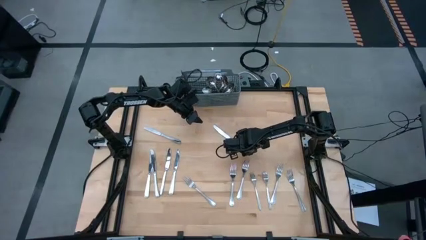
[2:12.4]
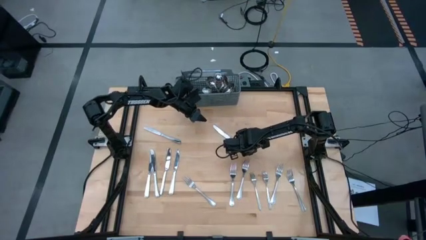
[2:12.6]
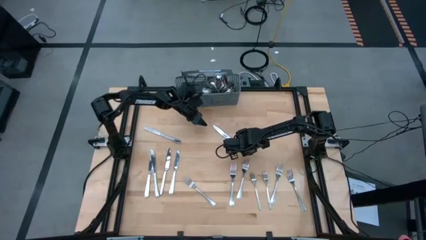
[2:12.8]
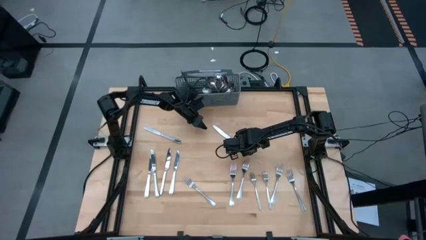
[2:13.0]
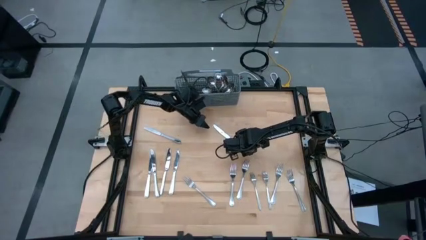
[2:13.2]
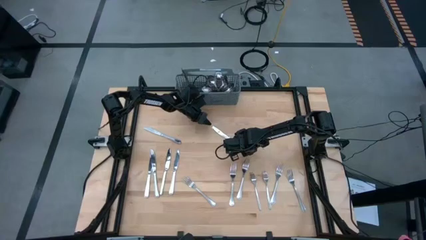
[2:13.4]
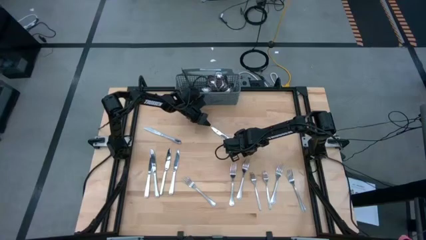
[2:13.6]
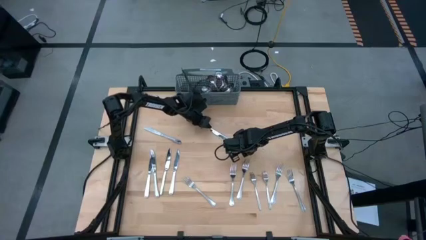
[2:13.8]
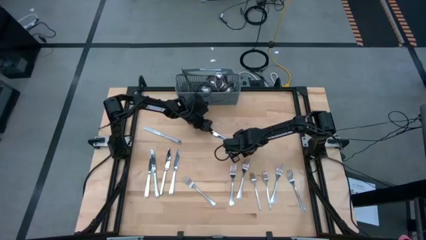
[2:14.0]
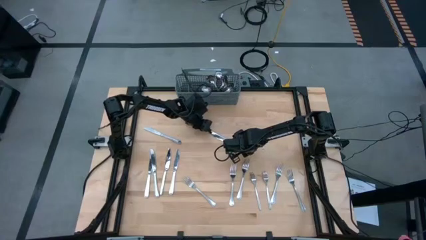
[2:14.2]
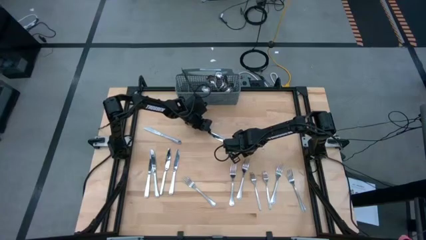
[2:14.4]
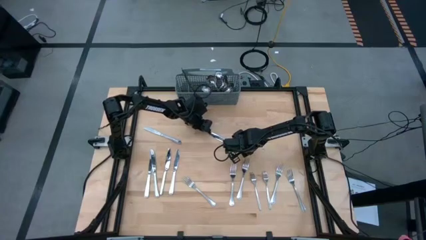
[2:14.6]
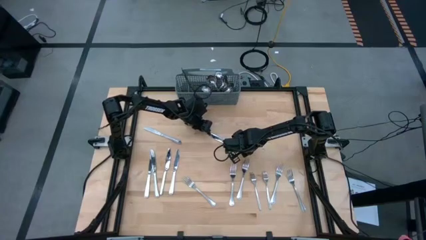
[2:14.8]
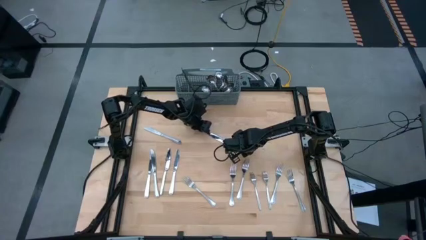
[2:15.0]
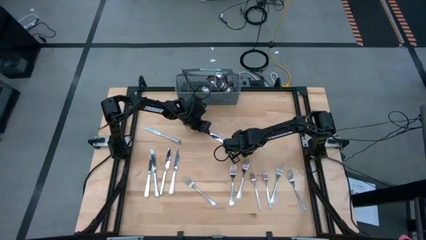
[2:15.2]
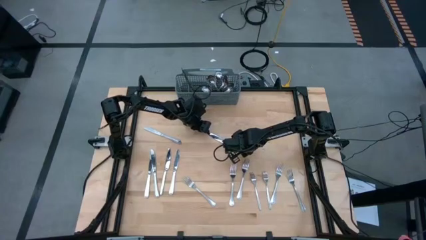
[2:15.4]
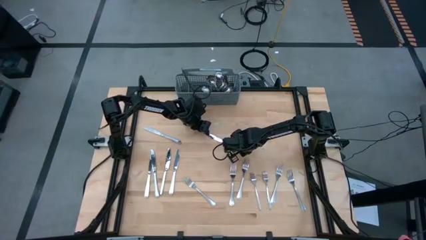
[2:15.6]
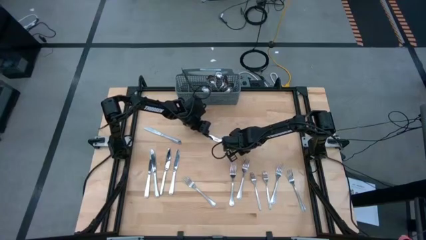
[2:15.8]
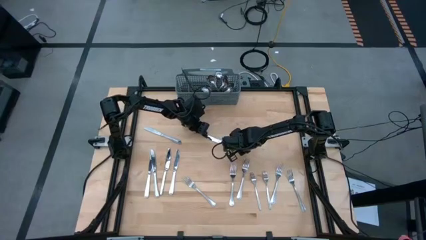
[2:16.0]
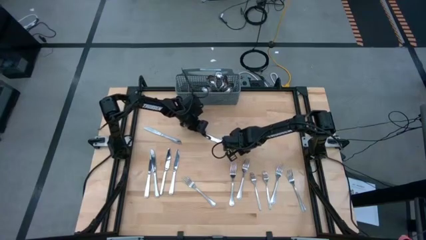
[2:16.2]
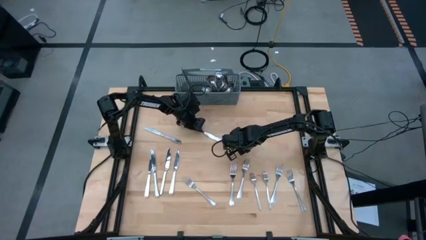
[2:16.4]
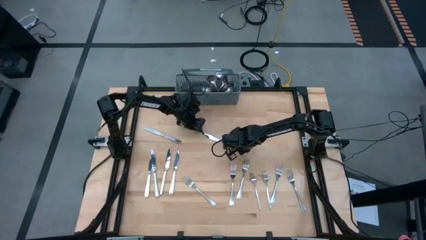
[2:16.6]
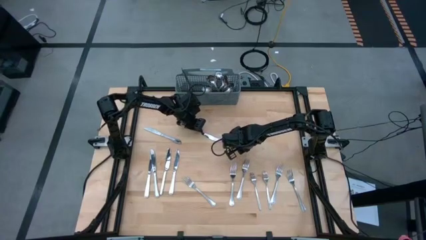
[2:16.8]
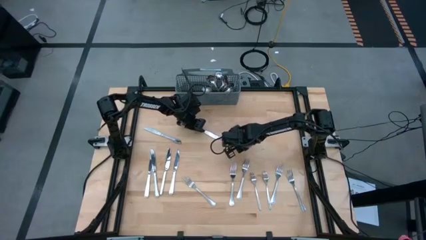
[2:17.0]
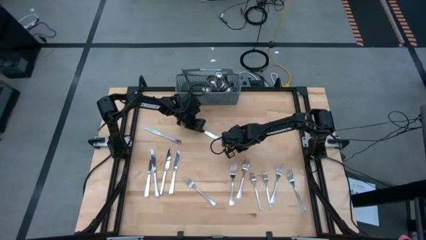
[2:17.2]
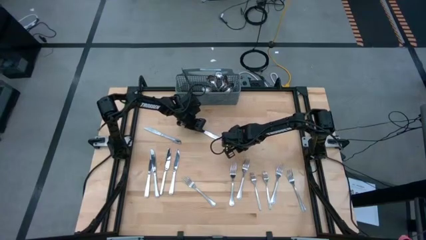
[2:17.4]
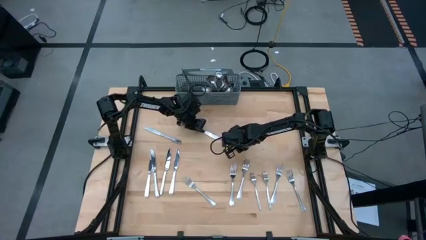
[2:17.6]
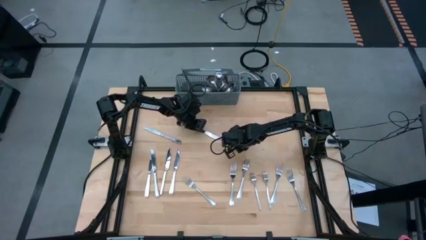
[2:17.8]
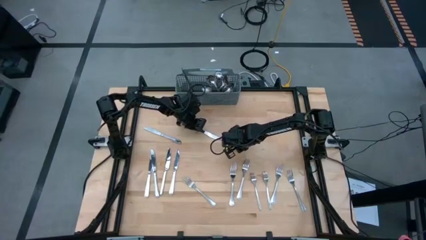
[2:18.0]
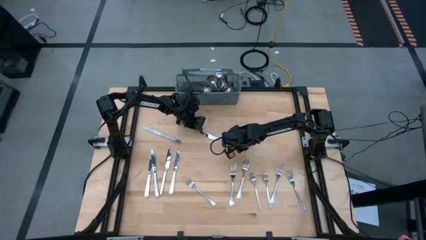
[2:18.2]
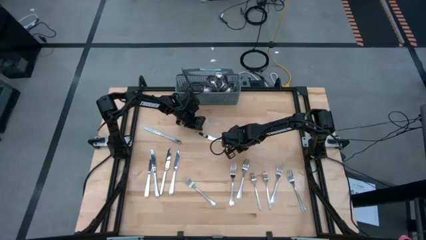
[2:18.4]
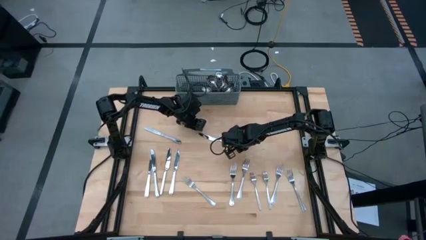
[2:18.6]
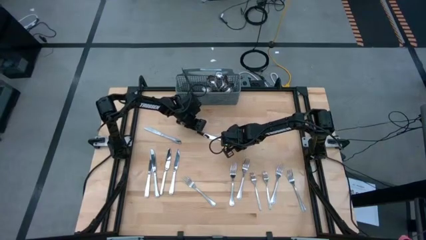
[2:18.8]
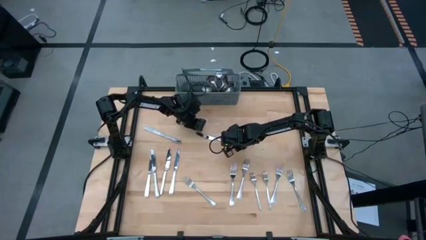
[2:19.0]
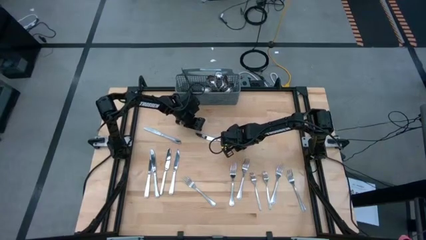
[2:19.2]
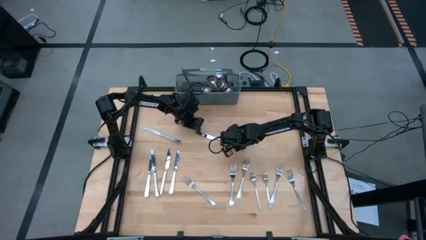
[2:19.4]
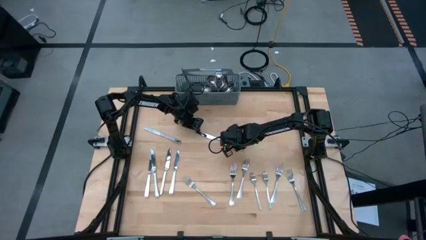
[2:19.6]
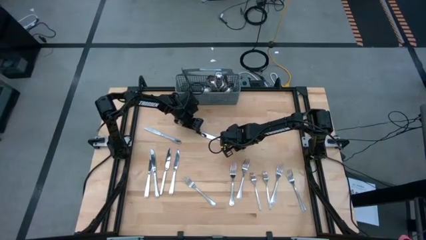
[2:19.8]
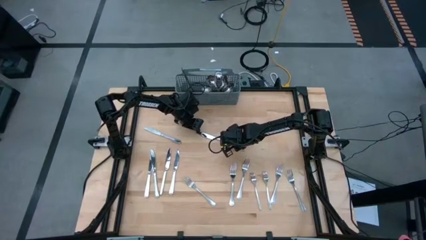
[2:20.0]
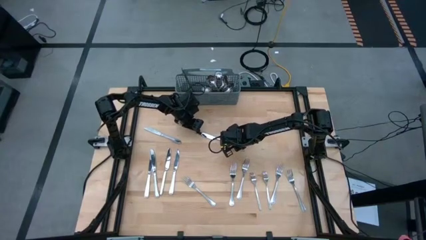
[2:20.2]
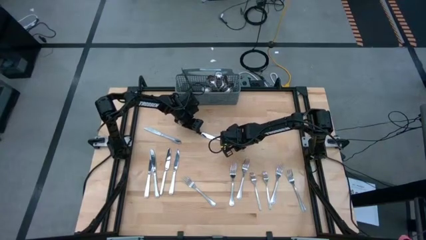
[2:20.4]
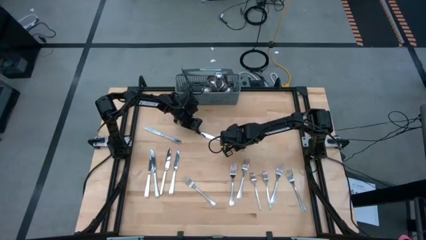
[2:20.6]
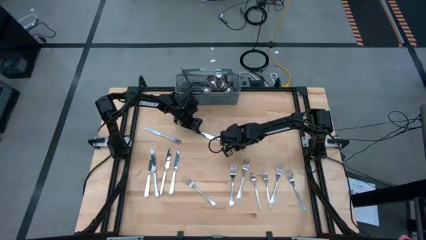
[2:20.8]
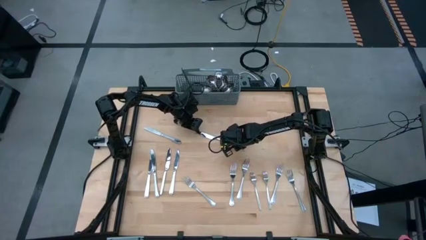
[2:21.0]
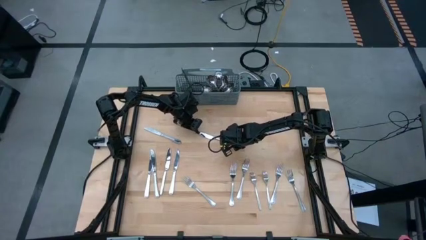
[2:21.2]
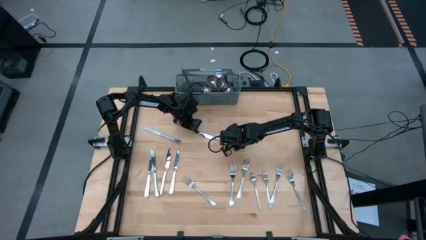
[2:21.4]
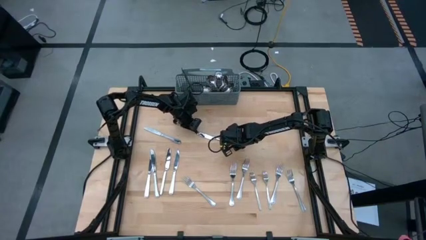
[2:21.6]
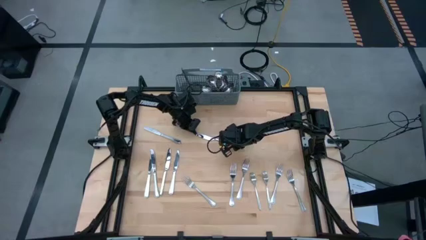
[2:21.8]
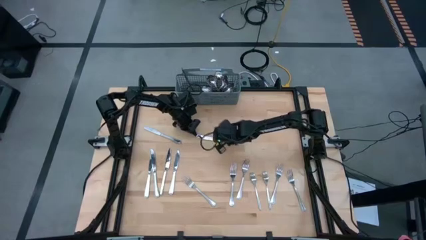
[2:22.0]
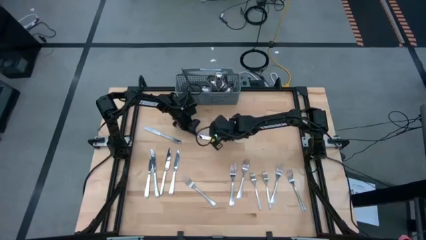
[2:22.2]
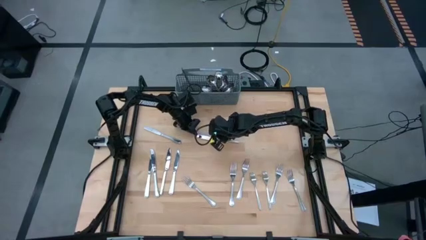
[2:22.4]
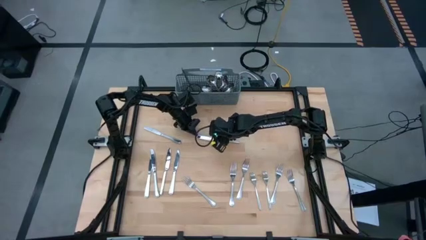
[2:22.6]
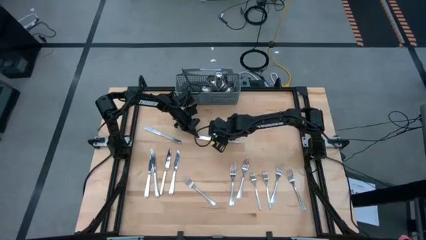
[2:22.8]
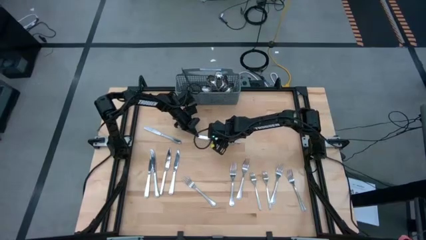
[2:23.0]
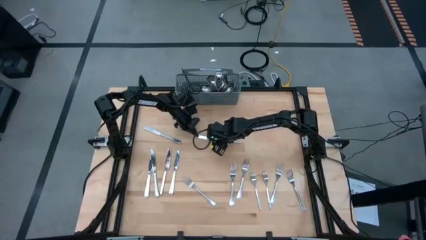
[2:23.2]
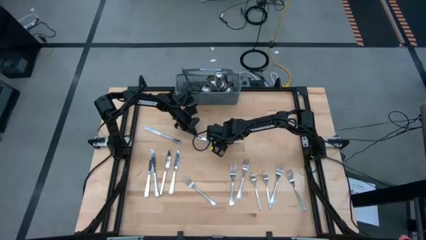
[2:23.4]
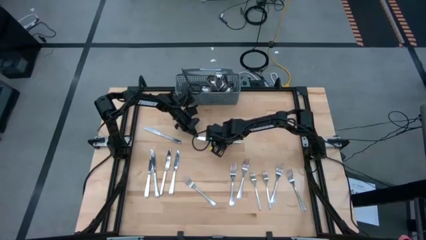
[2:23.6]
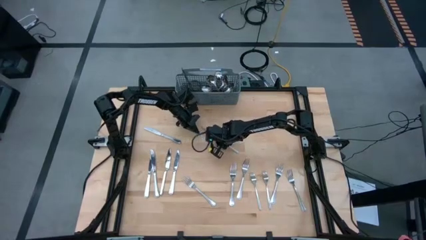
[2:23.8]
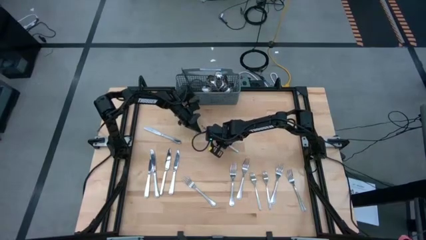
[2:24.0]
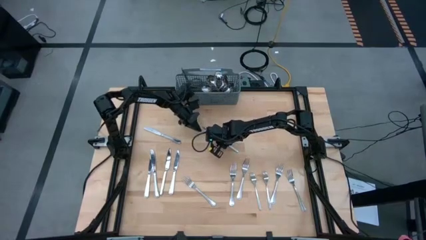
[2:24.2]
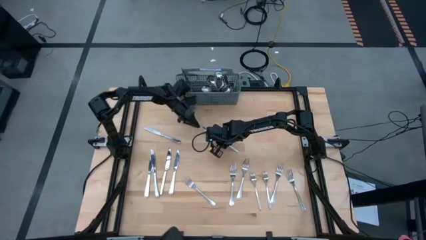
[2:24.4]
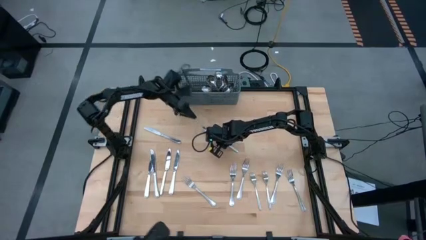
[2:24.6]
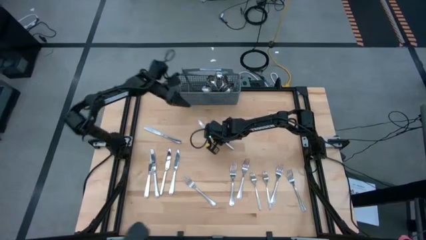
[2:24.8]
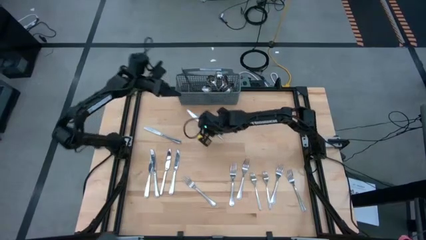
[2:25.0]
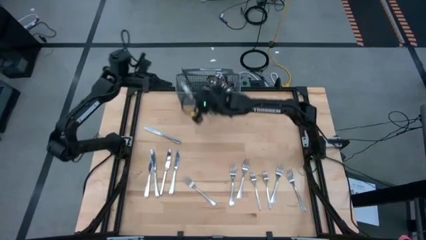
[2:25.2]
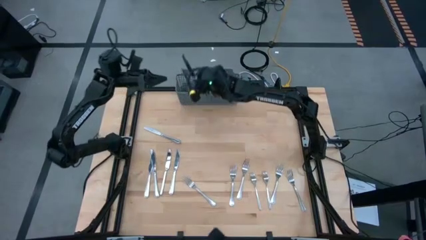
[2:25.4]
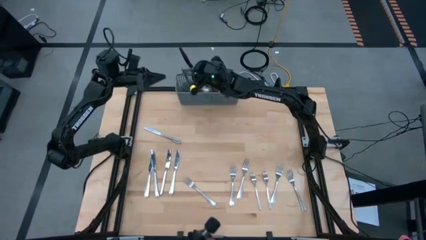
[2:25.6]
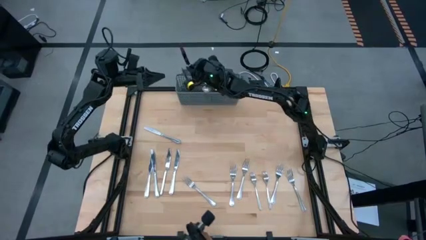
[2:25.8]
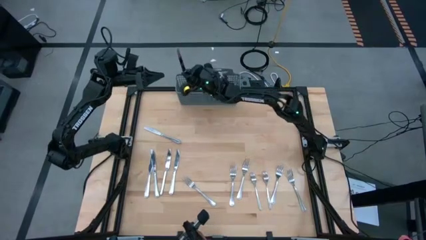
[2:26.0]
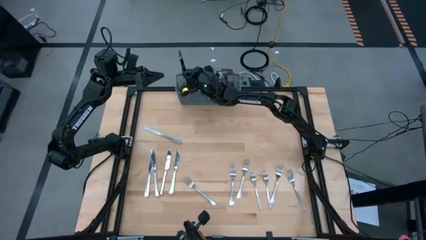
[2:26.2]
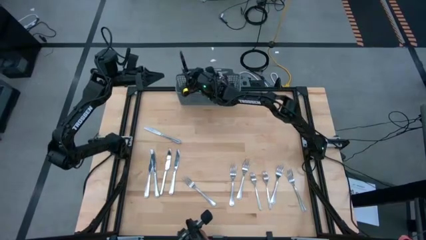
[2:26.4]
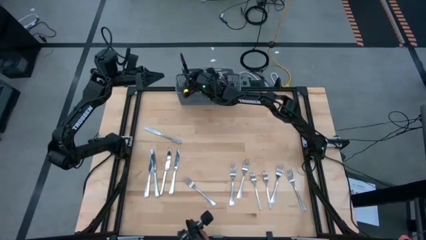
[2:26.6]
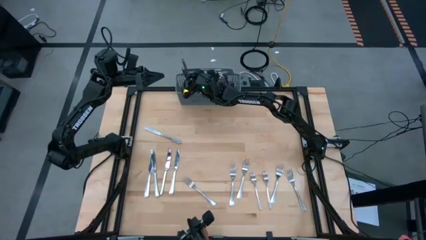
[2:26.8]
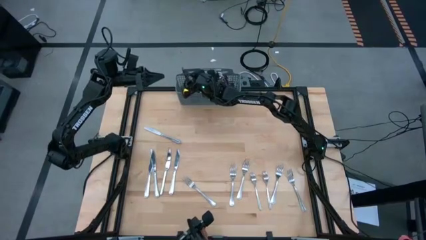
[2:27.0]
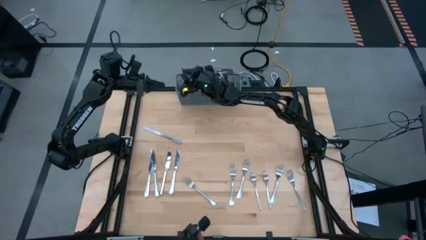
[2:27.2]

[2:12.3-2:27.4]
Task: Sort silverware
Put the silver knife into the gray utensil holder

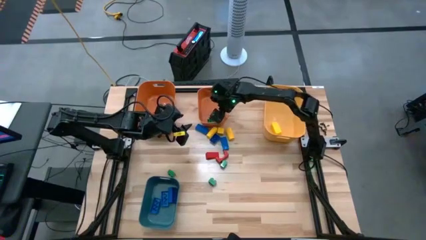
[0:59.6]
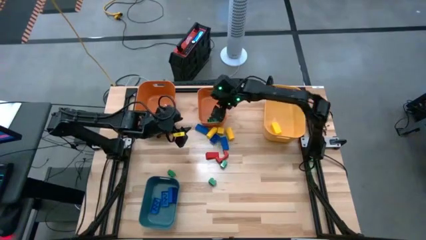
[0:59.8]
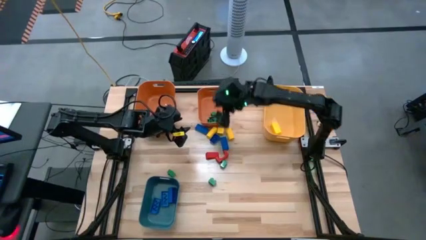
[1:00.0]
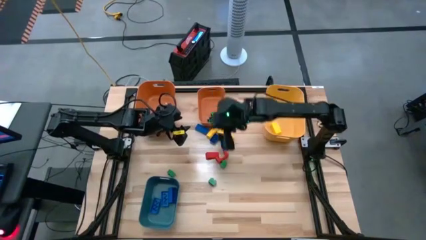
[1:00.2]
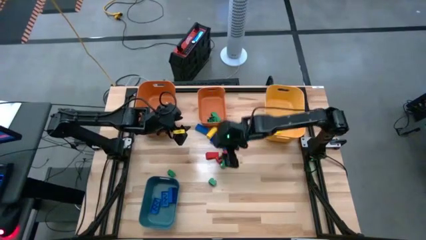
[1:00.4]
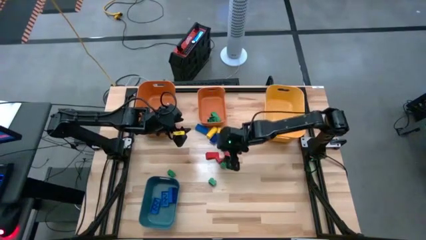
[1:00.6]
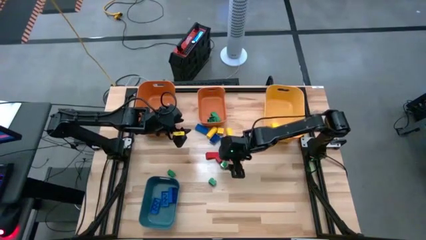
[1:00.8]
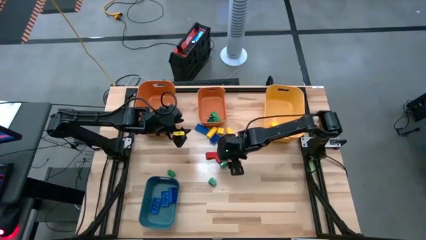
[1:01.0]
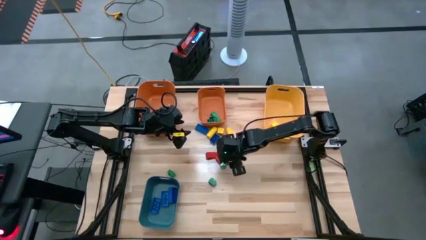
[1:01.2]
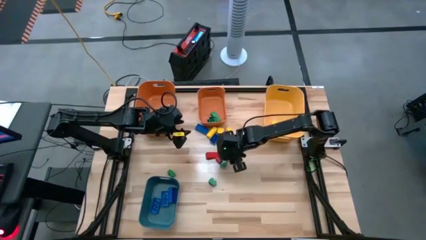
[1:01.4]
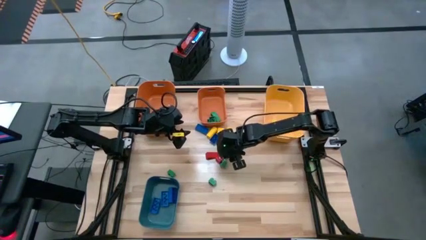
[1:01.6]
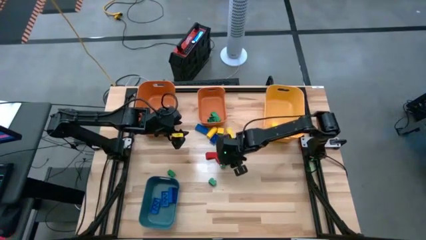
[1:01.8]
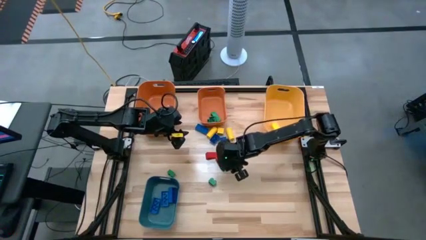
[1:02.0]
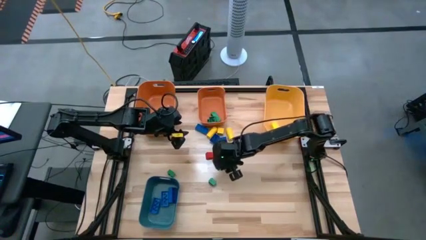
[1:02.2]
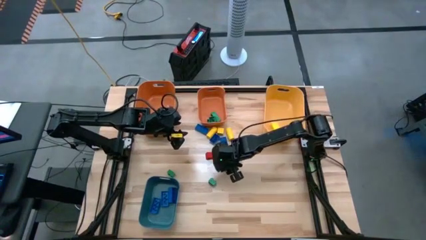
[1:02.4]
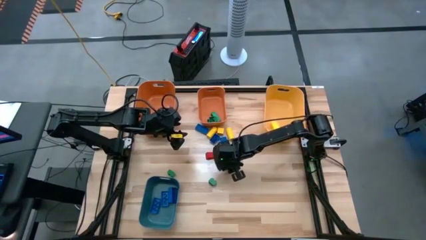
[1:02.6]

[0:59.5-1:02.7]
Task: Sort blocks
Put the green game piece into the right orange bin
